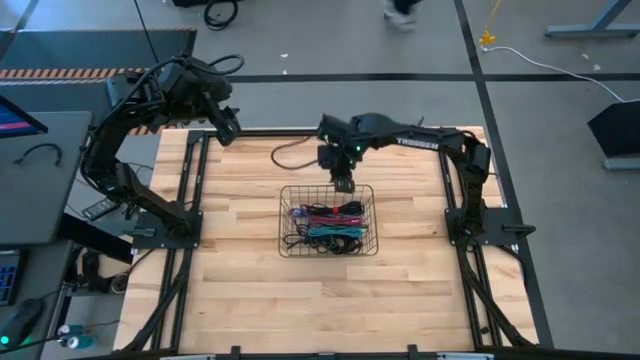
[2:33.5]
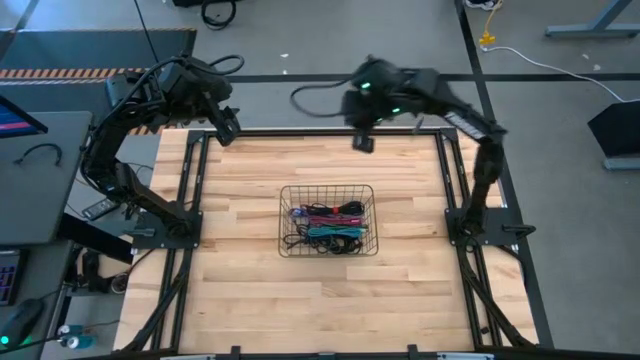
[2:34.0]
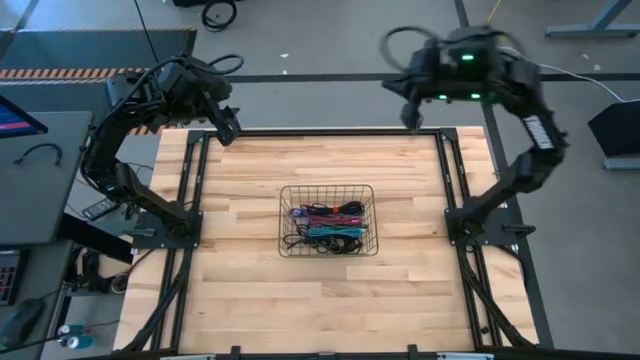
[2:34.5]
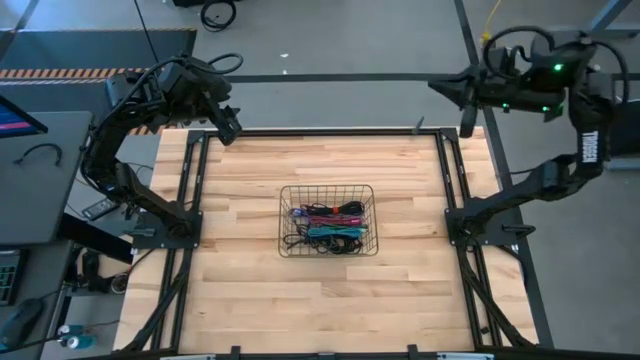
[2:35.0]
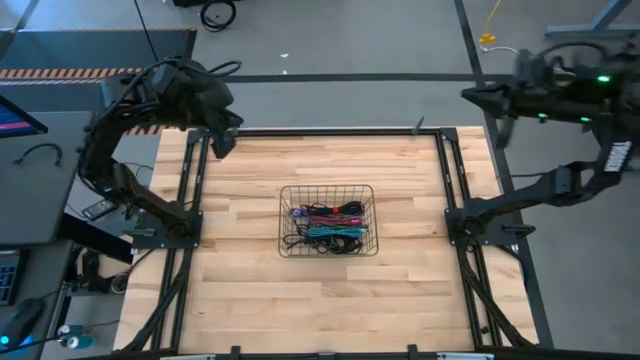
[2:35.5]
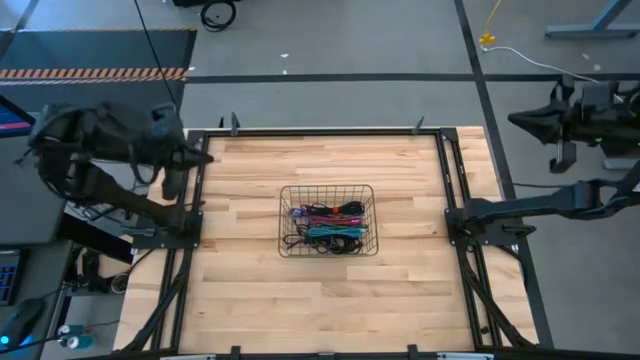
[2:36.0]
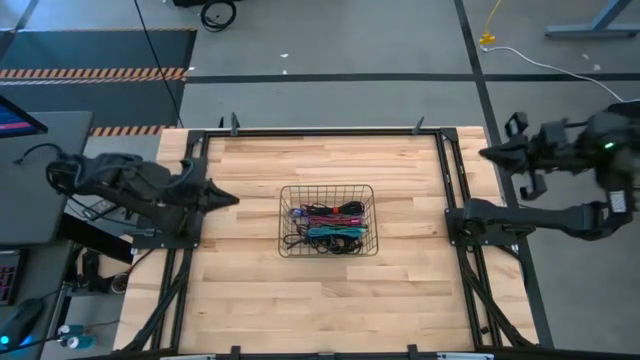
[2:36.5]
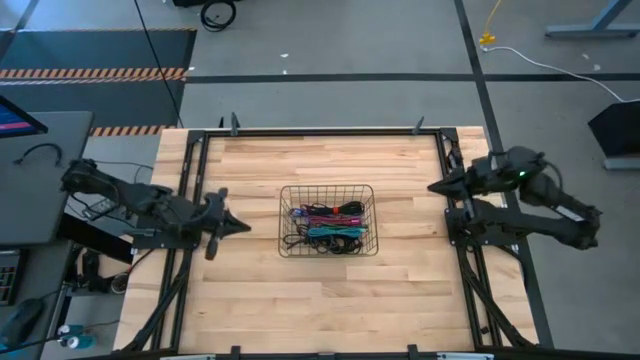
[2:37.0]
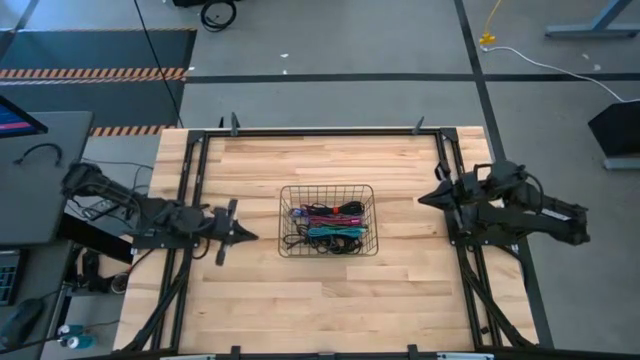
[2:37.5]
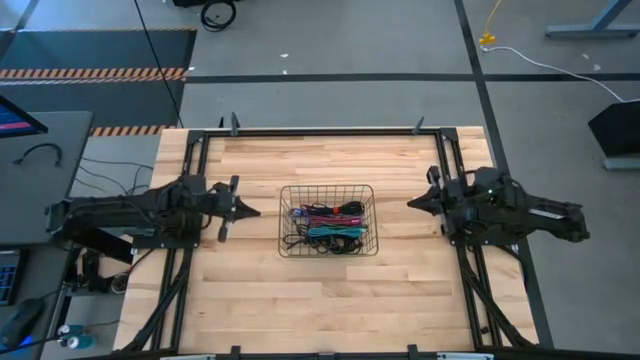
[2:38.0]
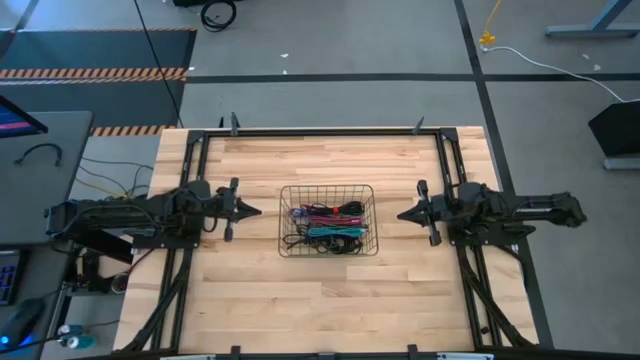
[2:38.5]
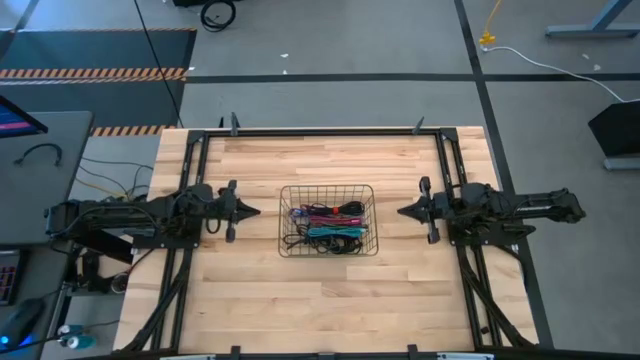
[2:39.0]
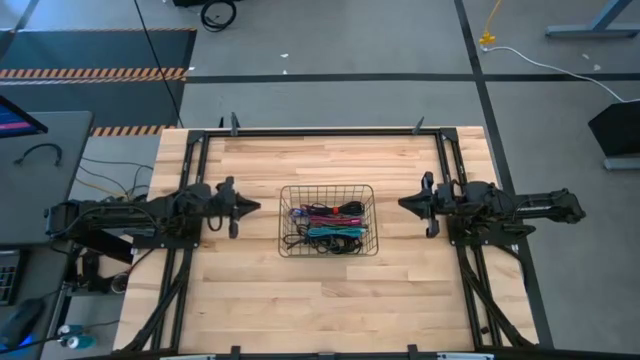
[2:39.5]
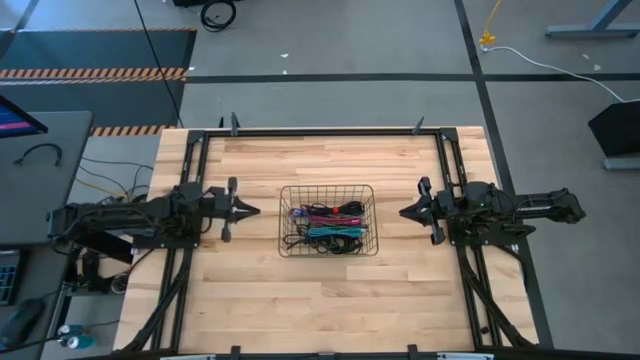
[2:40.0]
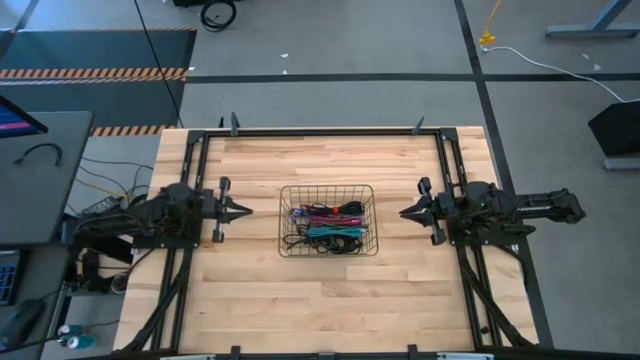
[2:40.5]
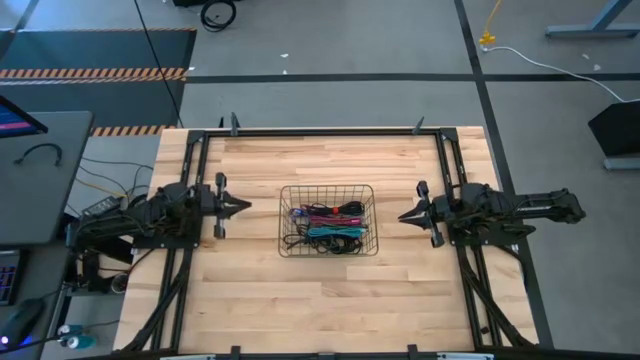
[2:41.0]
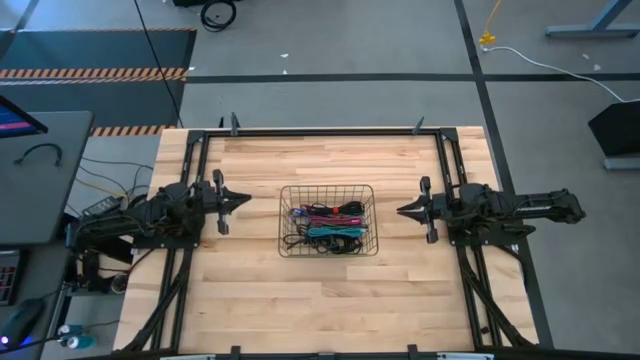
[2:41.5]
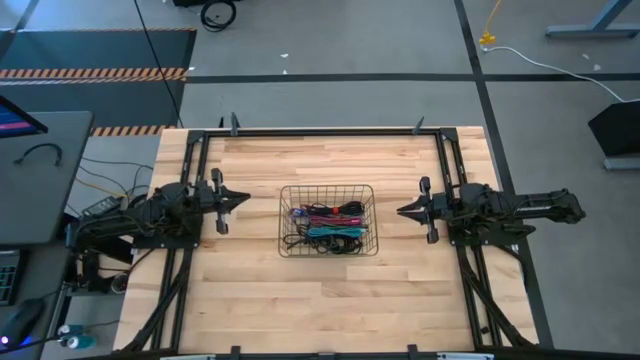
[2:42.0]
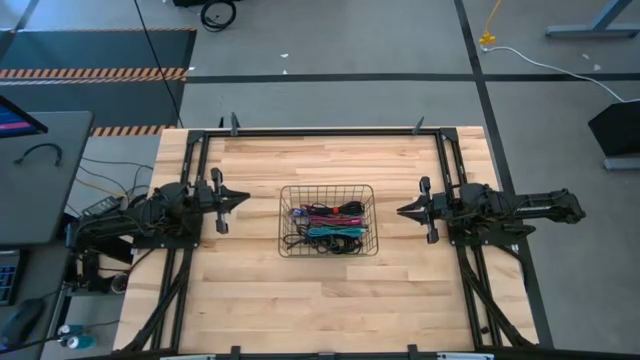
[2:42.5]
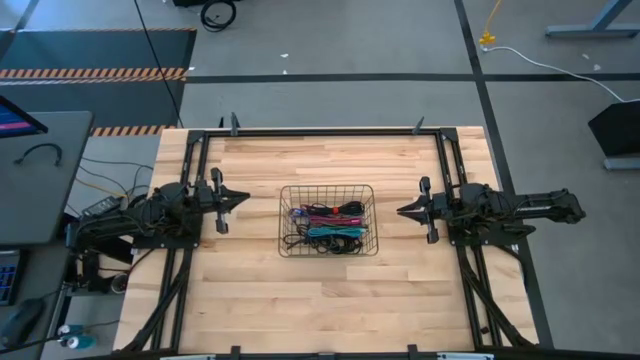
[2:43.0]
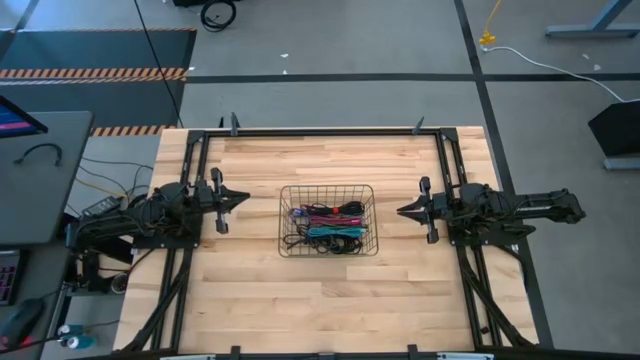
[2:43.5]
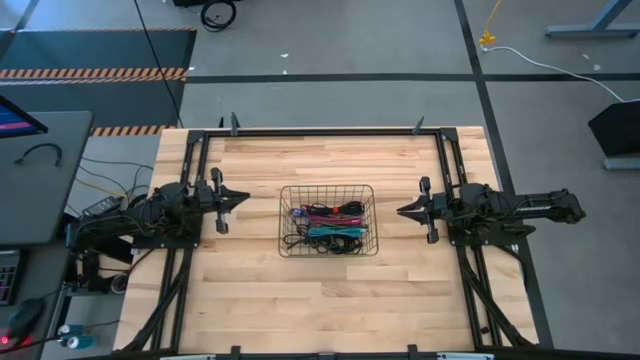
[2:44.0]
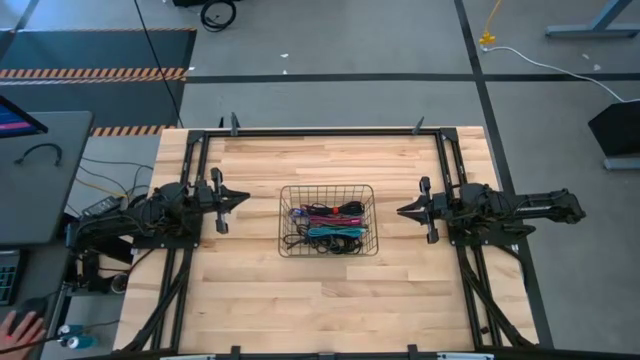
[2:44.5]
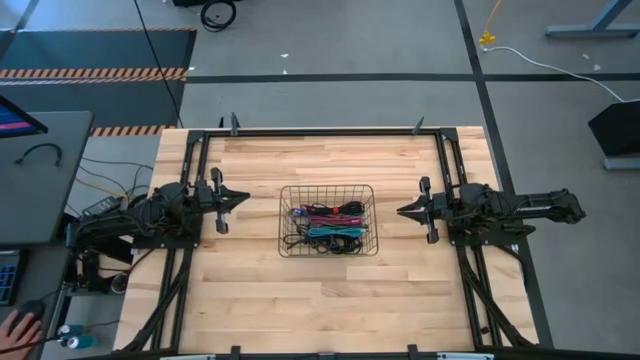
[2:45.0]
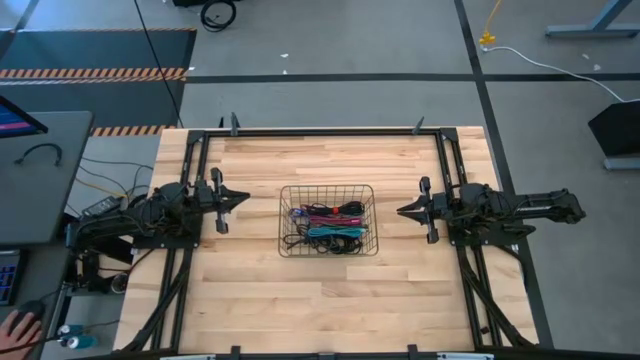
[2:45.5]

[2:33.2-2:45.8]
Task: Pick and place USB-C Cables
Return to Home Position

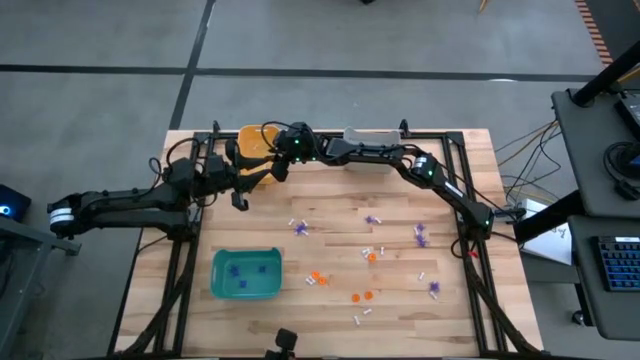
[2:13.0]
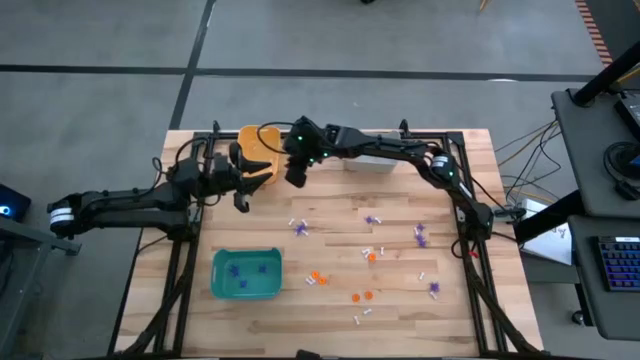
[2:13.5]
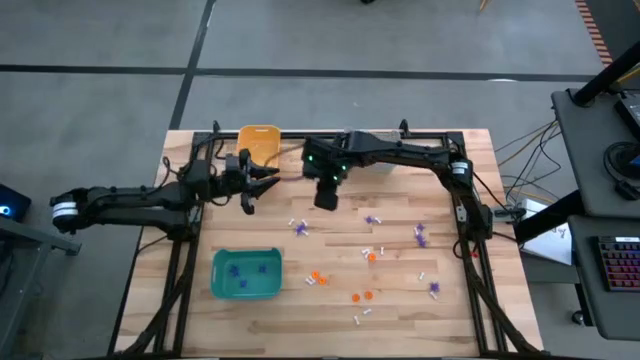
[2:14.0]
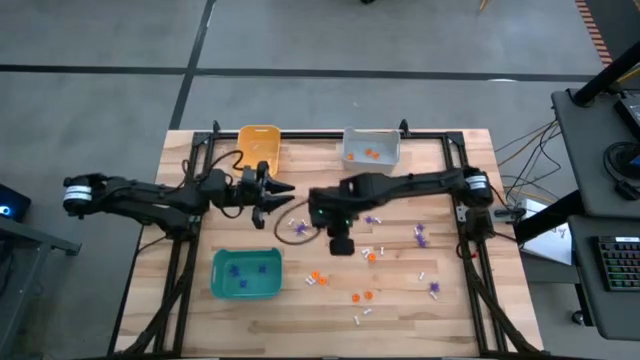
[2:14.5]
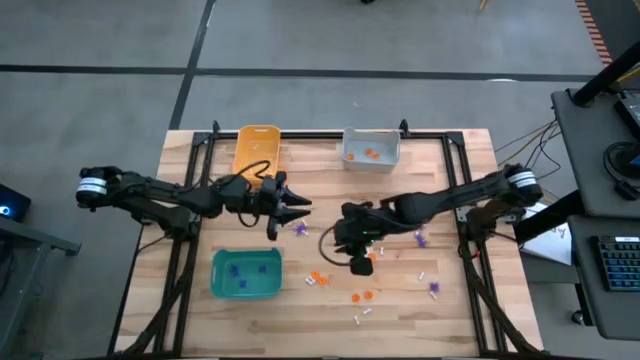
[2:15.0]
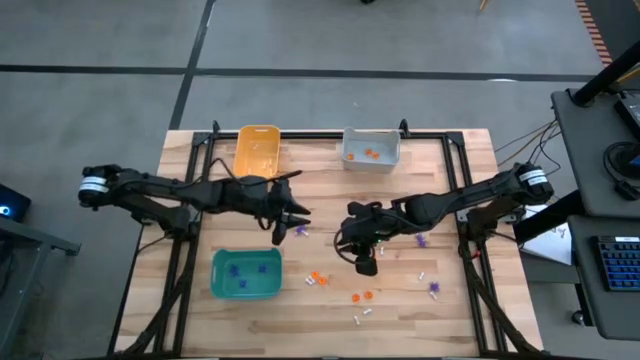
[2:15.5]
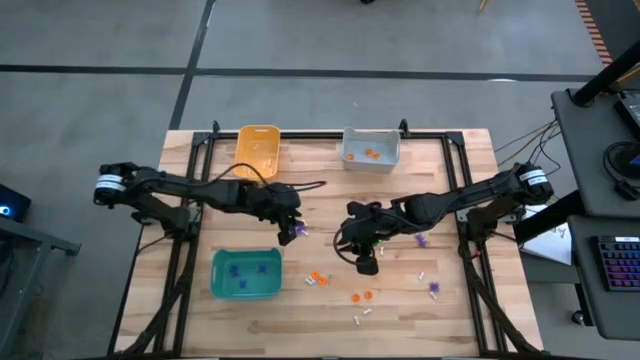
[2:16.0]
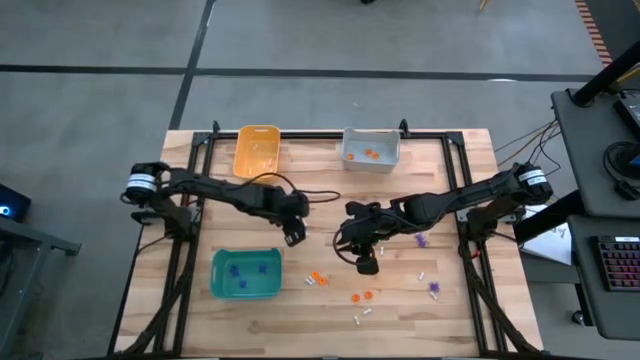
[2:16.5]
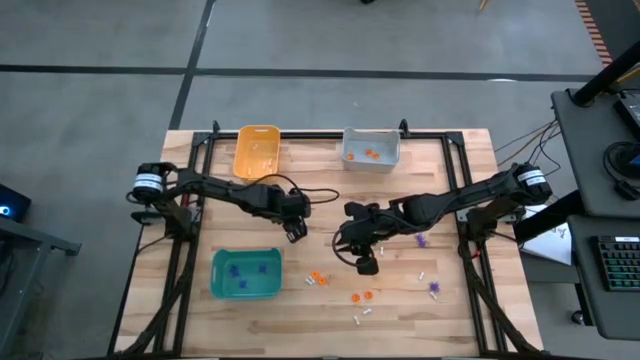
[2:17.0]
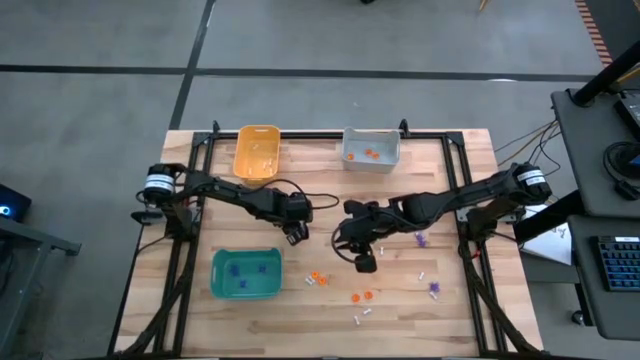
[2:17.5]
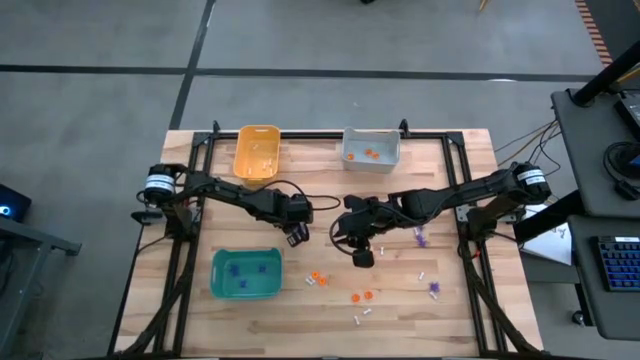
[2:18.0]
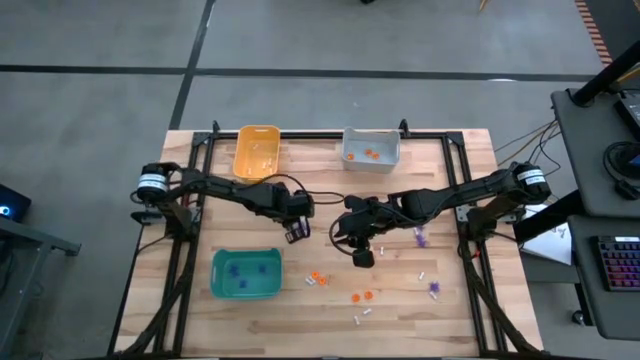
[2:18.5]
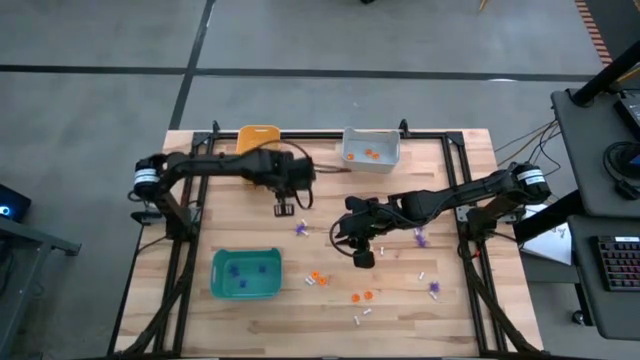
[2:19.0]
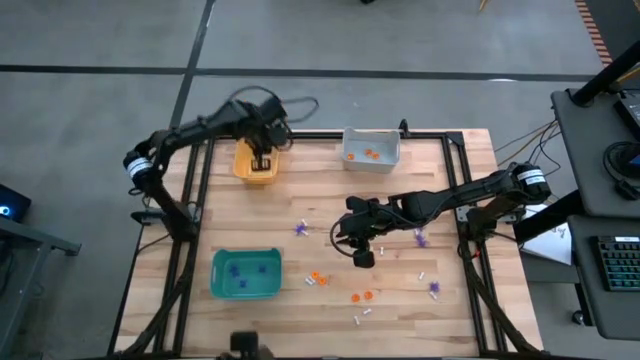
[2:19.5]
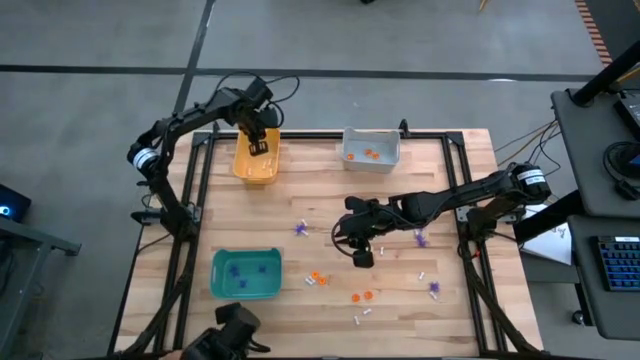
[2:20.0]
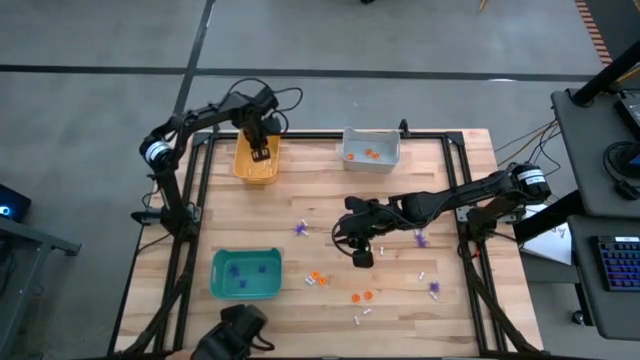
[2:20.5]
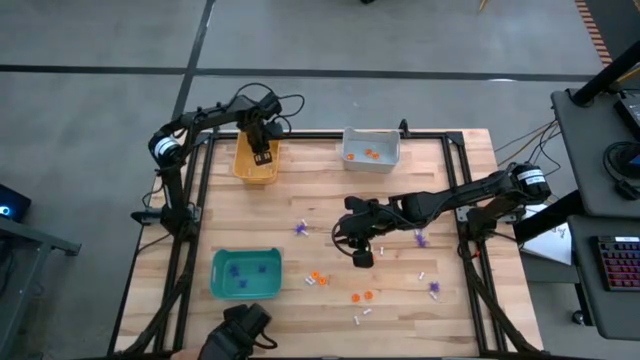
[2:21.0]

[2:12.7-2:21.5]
Task: Sort Halloween decoration
Put the white bone toy into the orange bin
